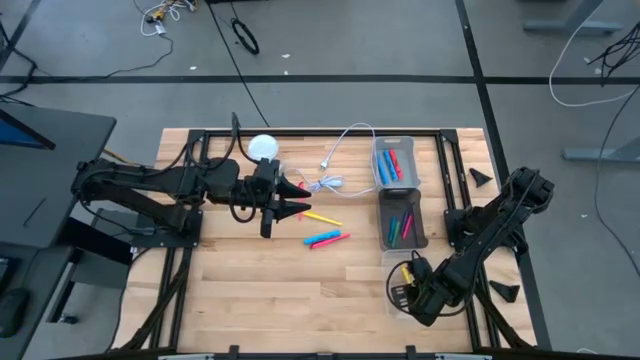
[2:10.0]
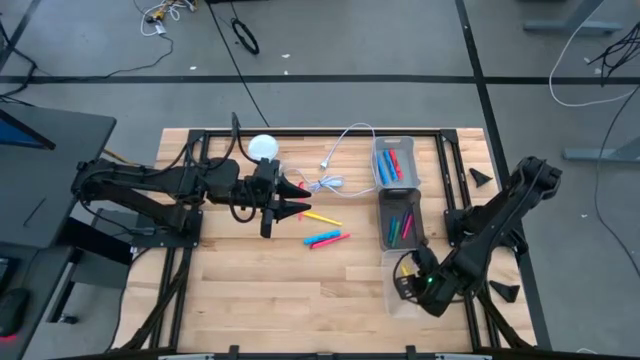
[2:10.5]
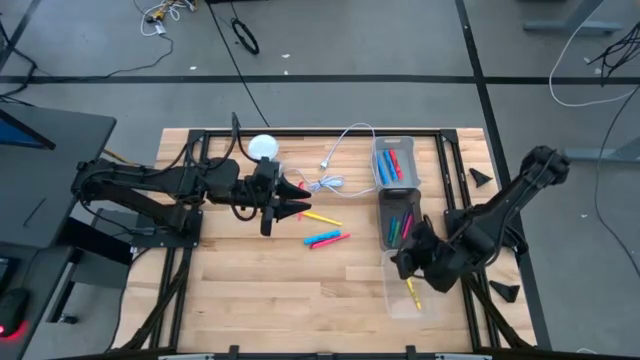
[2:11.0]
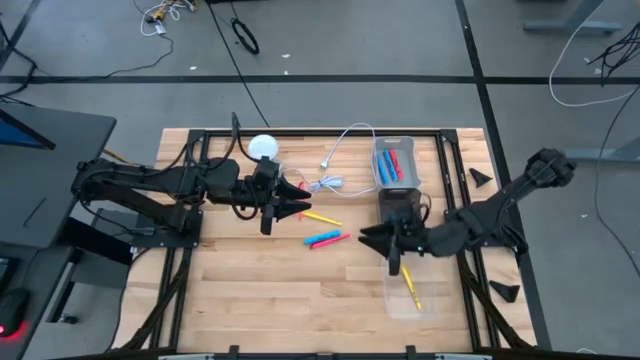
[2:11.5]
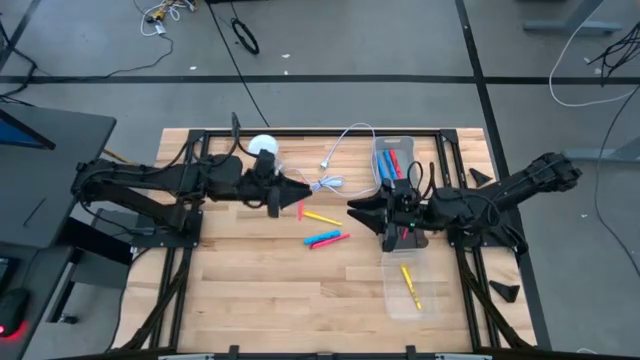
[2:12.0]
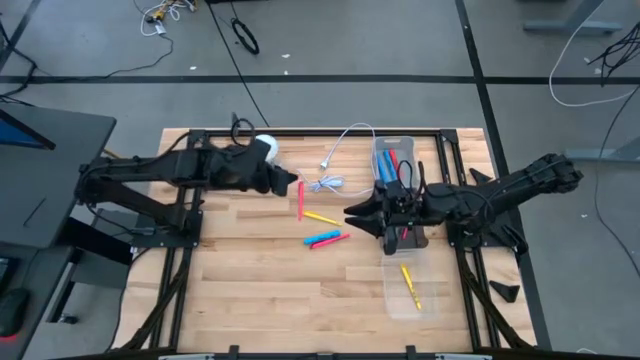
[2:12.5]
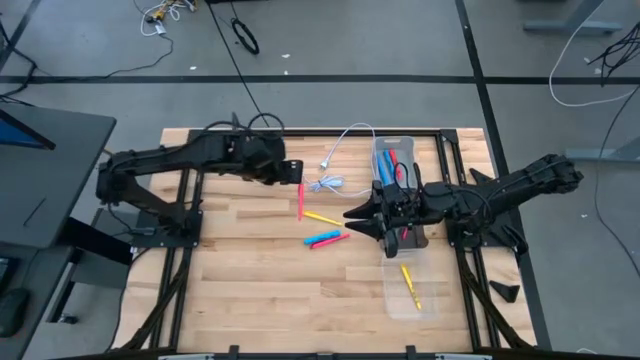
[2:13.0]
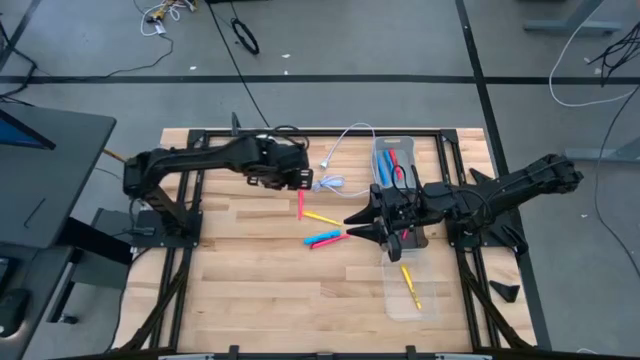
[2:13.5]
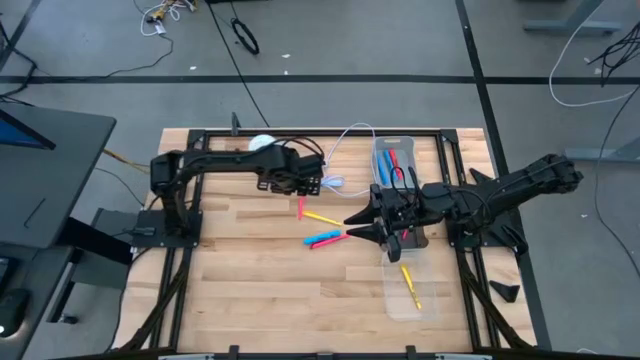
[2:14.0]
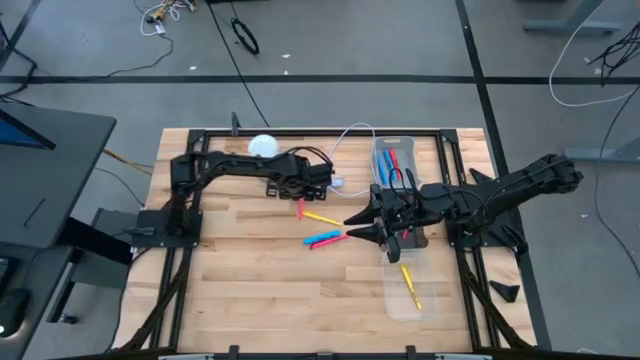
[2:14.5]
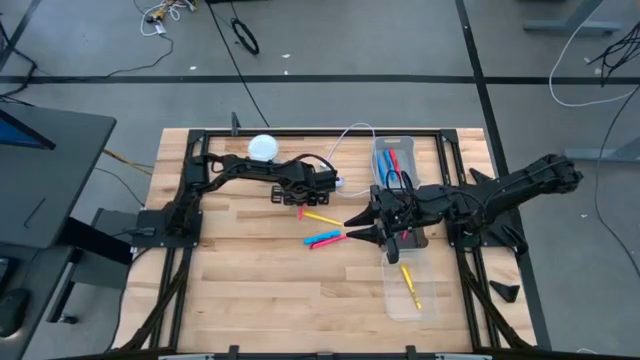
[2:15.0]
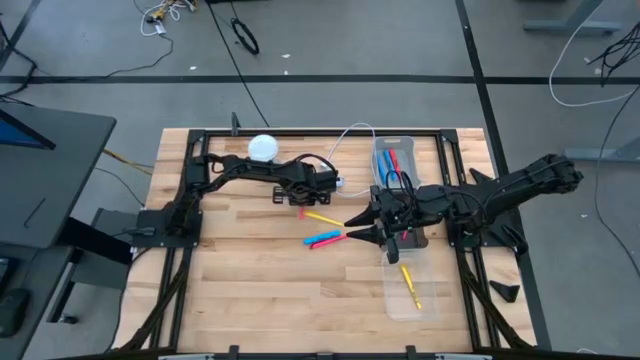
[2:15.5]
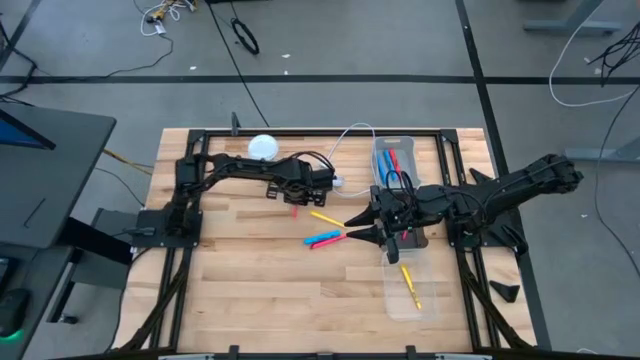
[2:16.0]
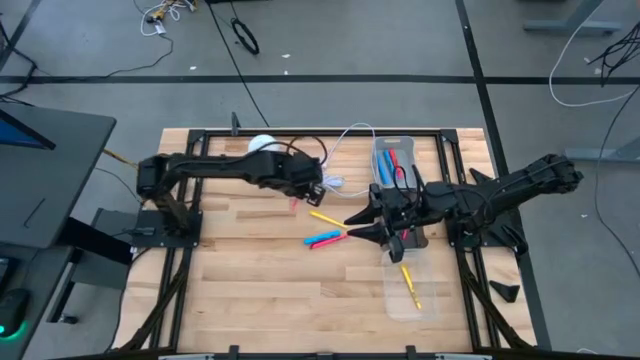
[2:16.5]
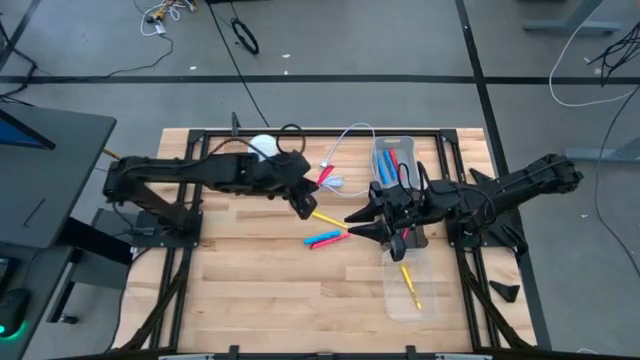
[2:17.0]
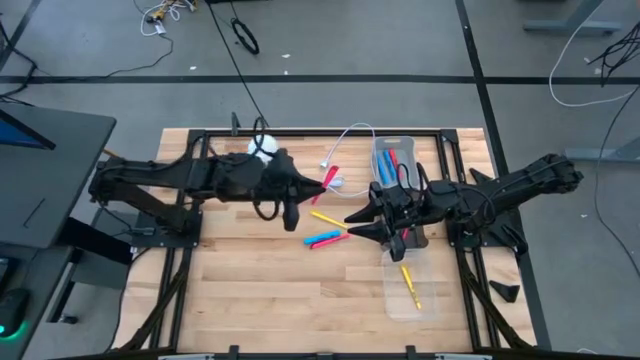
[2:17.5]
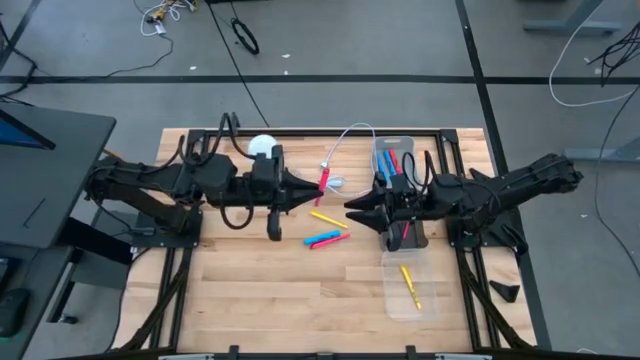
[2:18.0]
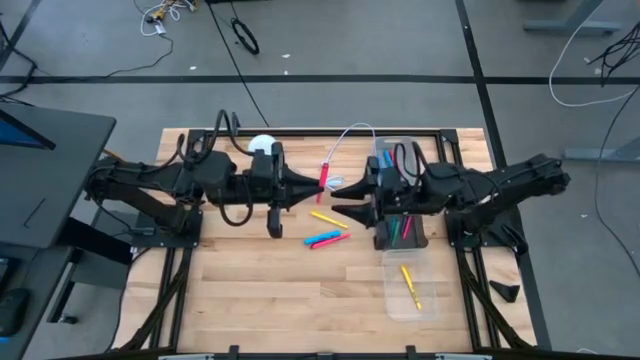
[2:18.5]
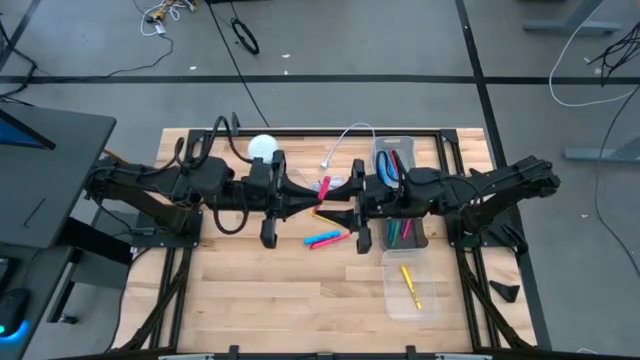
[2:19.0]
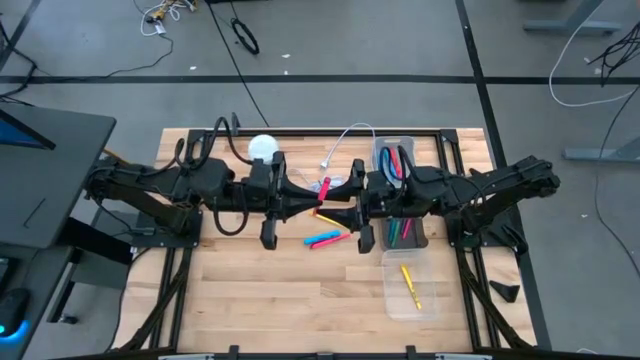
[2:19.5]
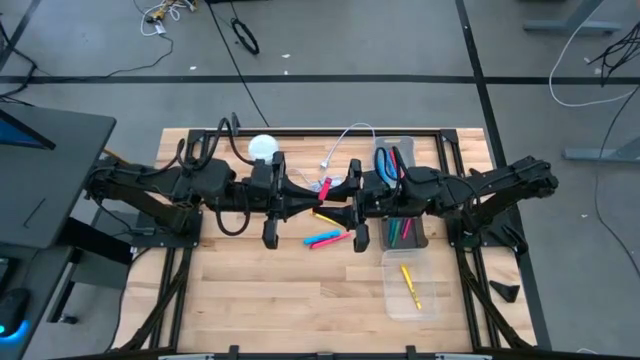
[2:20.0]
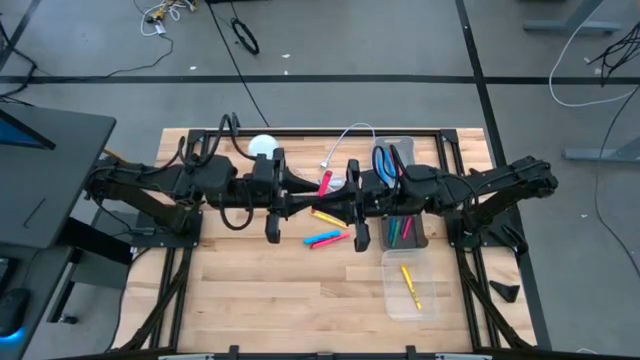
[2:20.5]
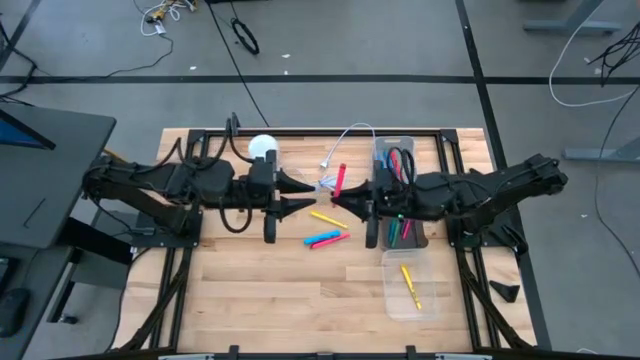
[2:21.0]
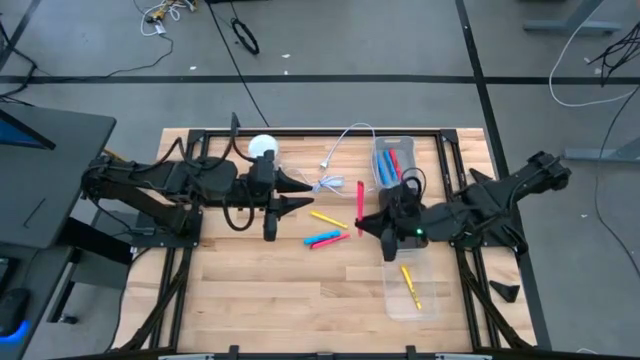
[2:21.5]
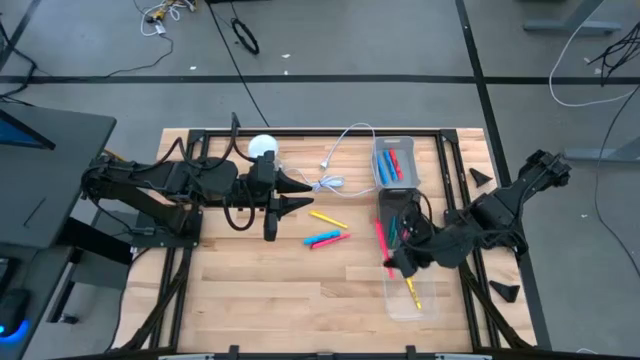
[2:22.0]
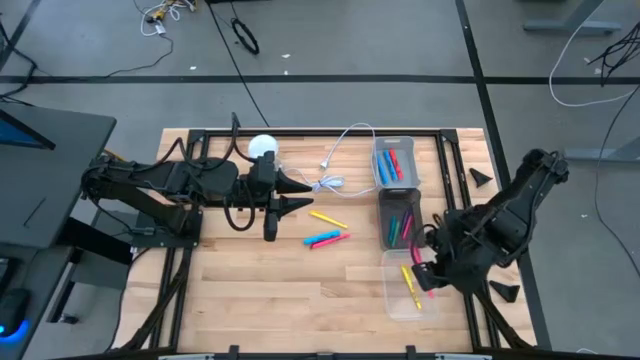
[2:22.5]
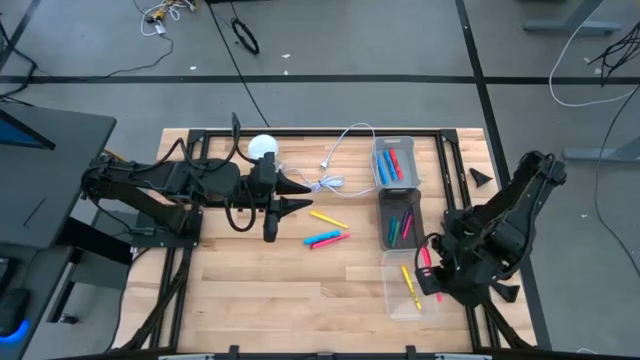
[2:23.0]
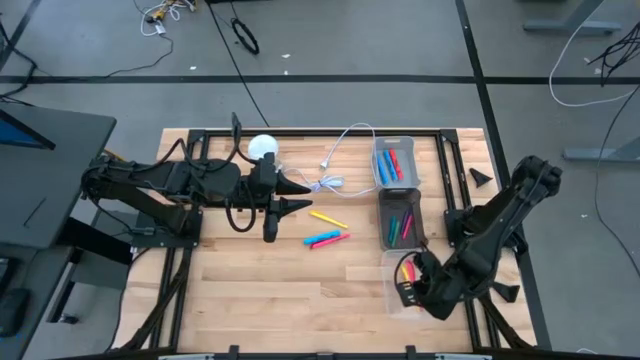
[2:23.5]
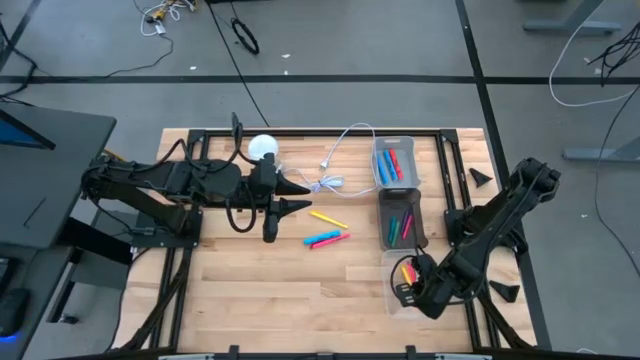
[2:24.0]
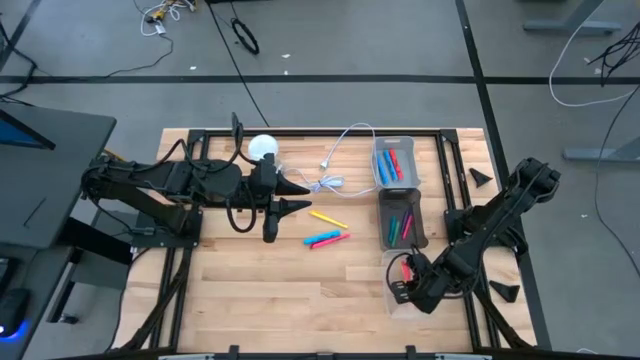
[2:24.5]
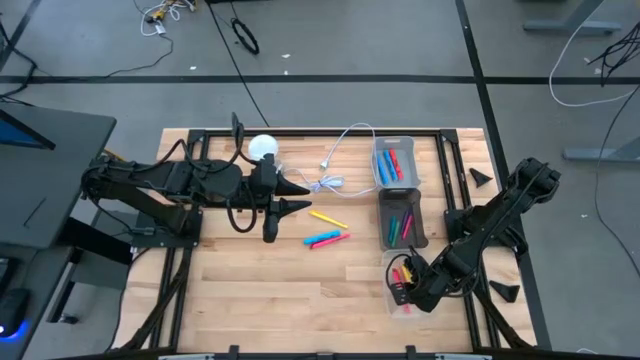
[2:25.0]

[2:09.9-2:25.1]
Task: Pick & Place Markers
Put the top pink pen into the transparent bin

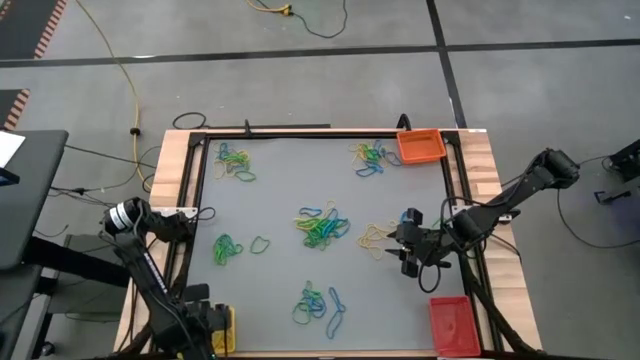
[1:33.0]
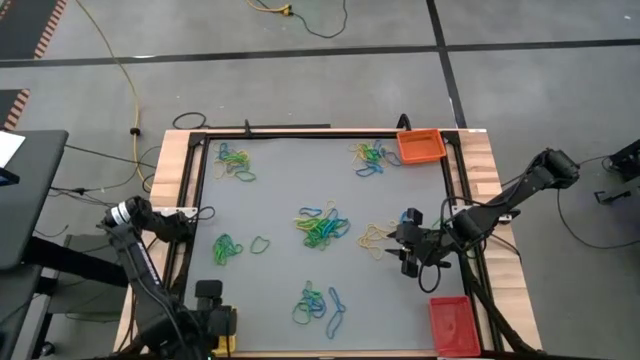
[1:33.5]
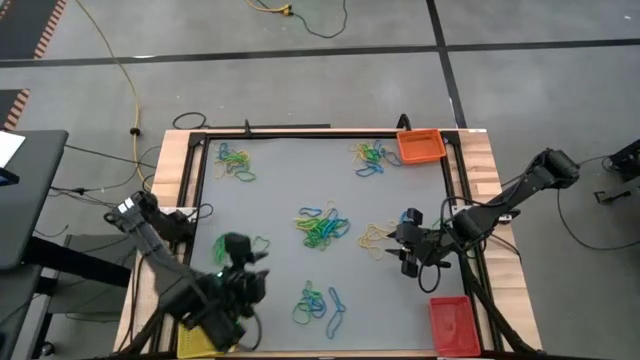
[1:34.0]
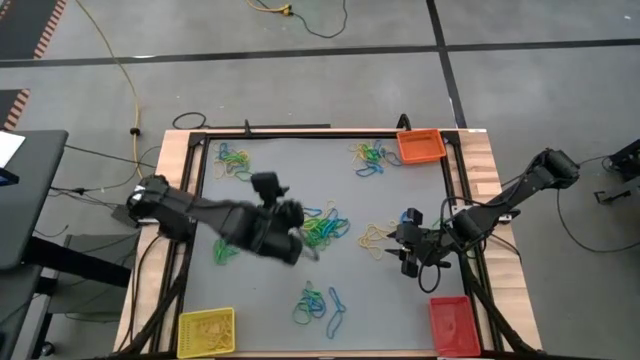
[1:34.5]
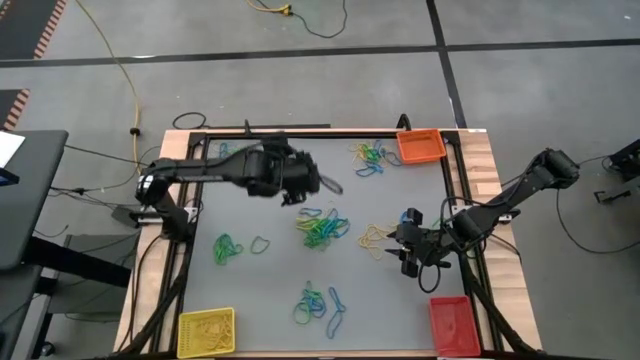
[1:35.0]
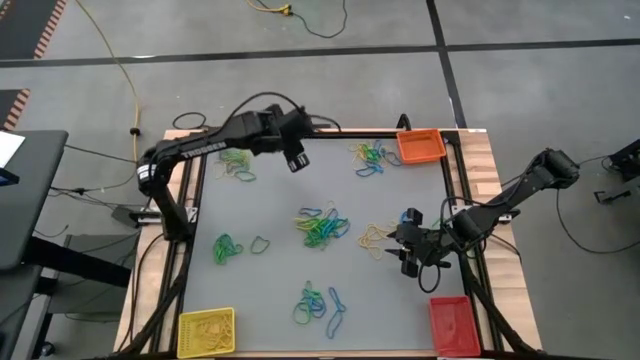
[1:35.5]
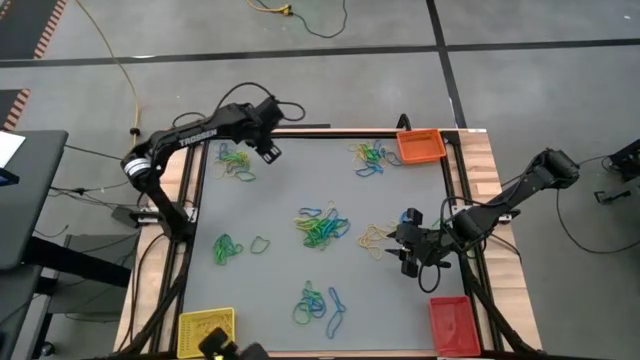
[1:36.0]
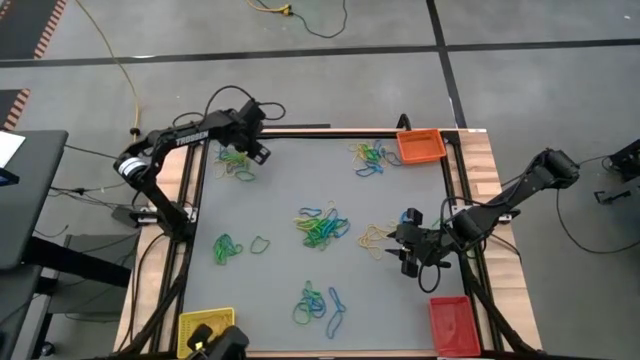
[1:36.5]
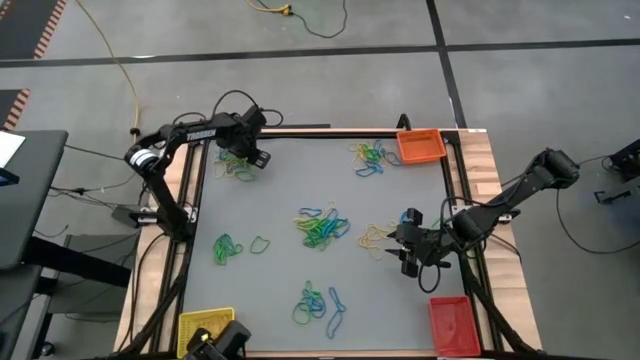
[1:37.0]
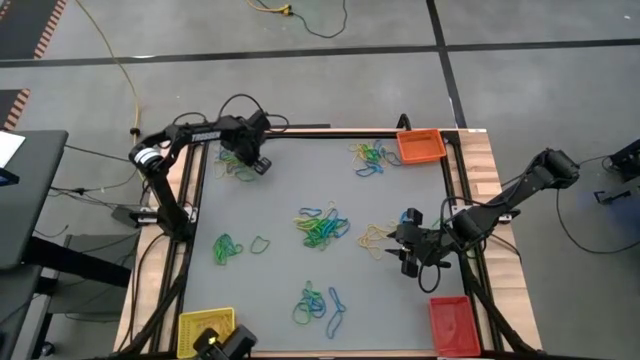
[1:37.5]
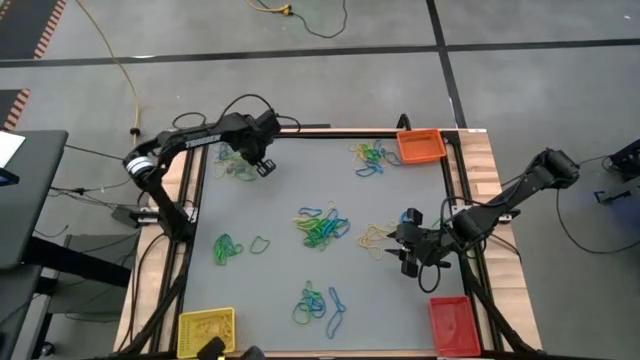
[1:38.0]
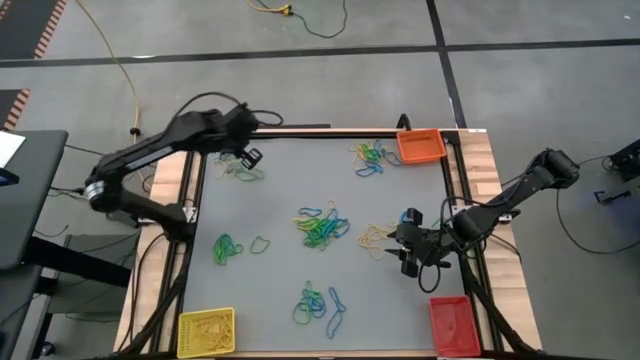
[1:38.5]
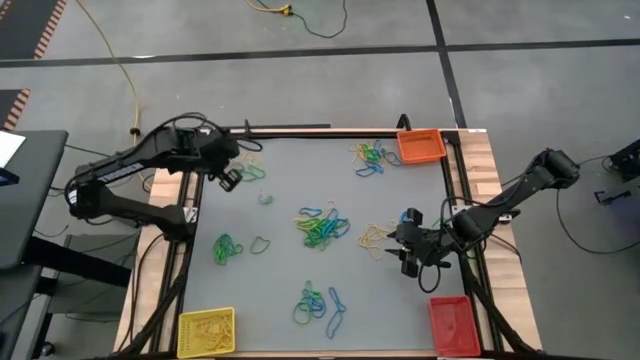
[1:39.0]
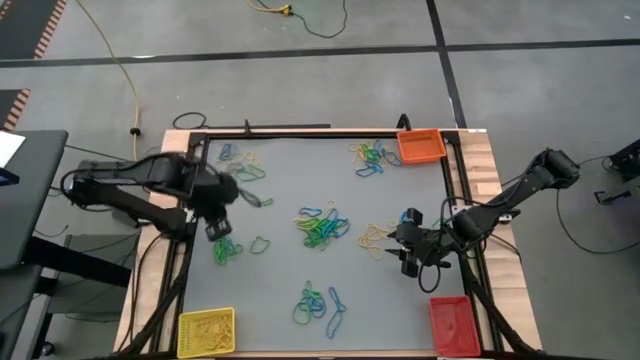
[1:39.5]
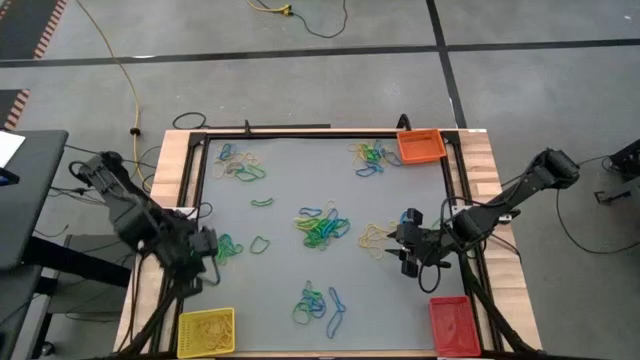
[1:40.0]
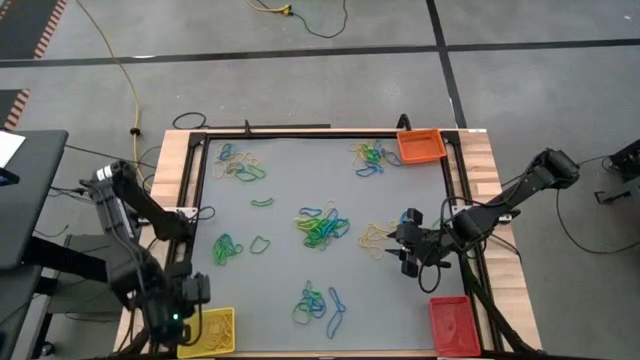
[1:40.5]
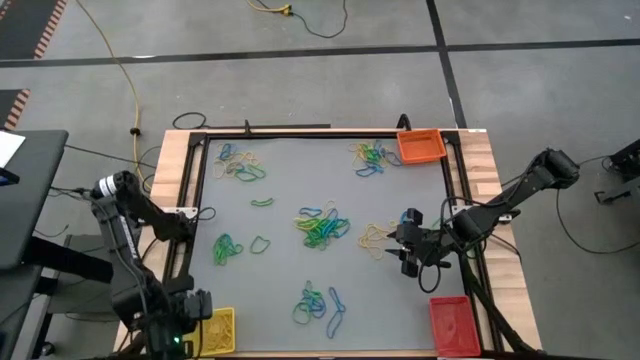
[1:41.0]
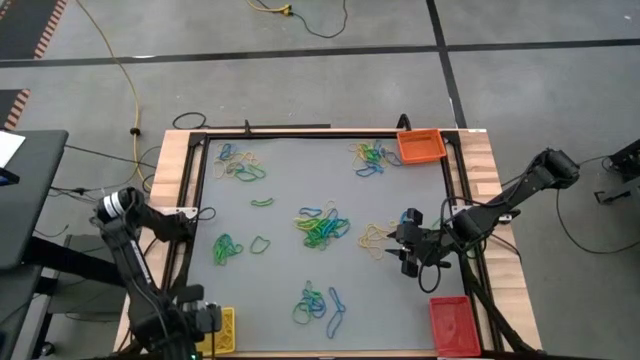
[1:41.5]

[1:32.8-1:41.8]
Task: Sort rubber bands into baskets
Put the yellow rubber band into the yellow bin
